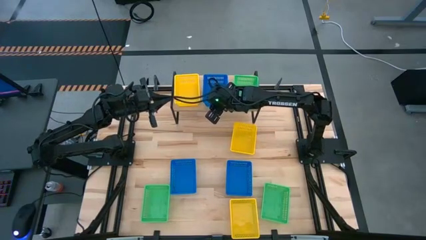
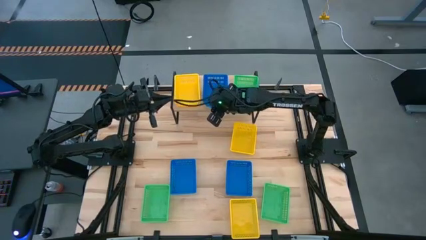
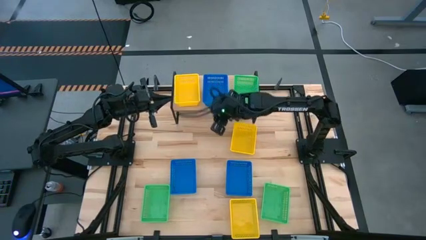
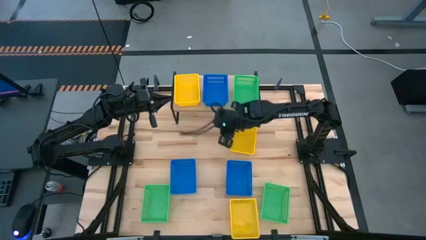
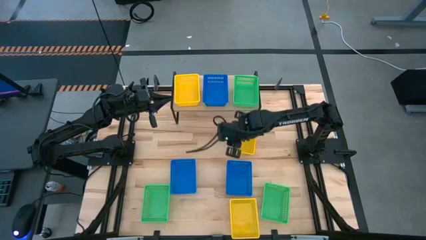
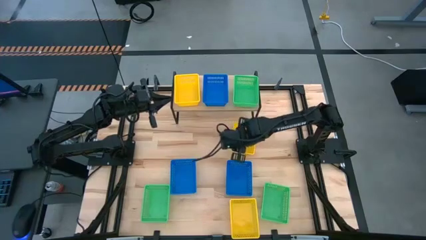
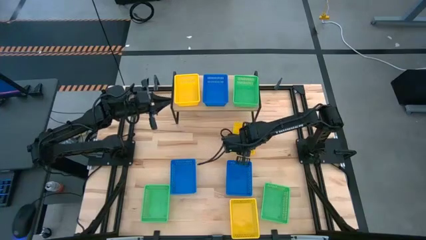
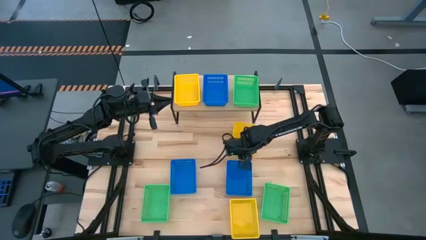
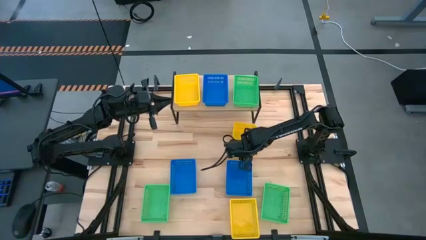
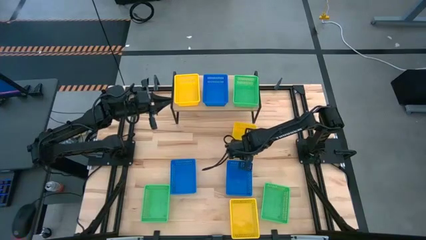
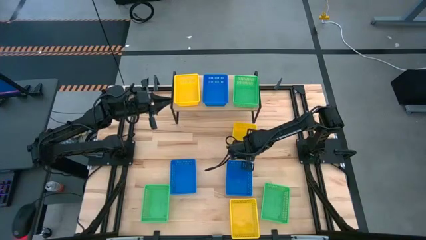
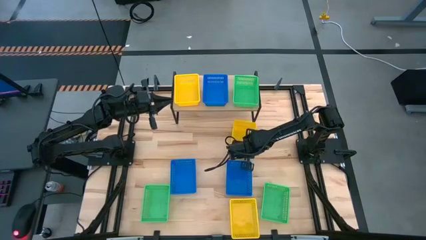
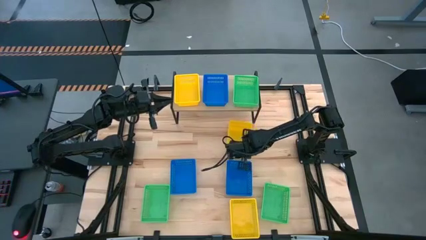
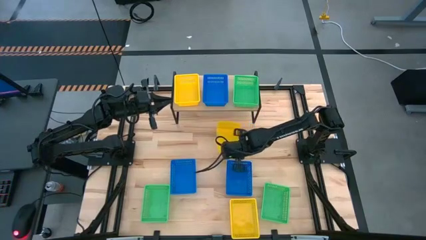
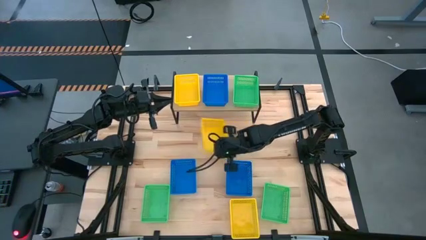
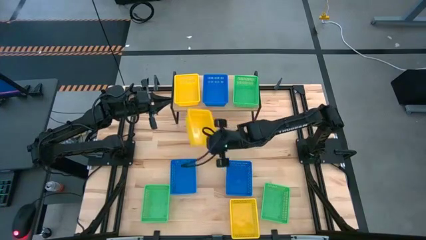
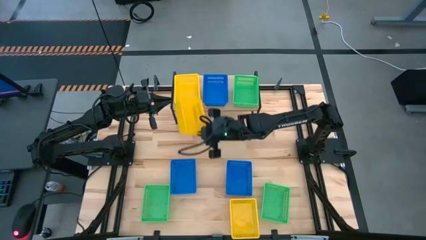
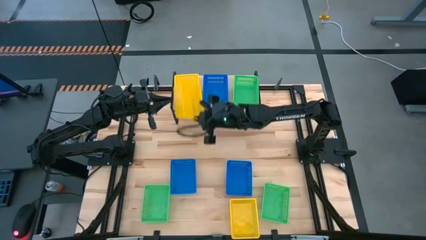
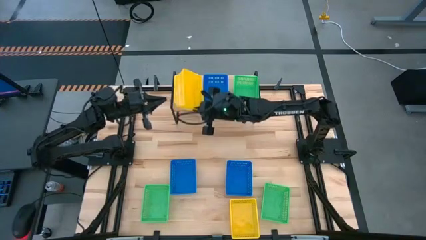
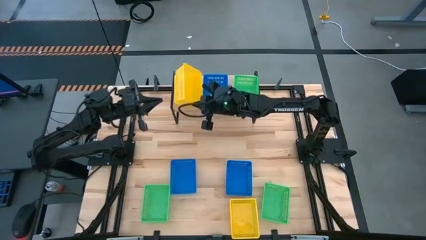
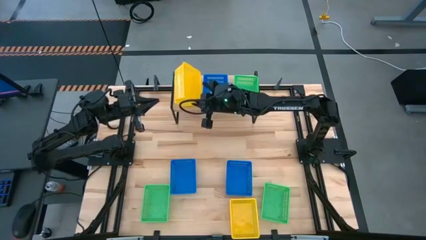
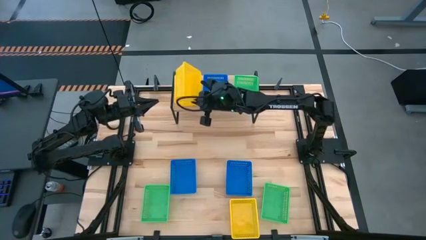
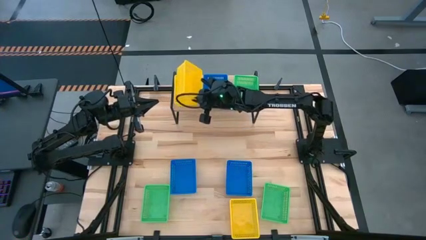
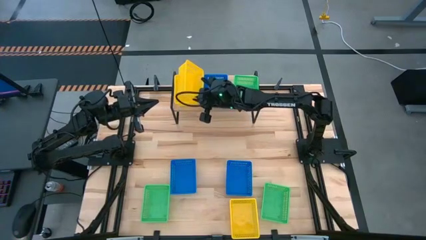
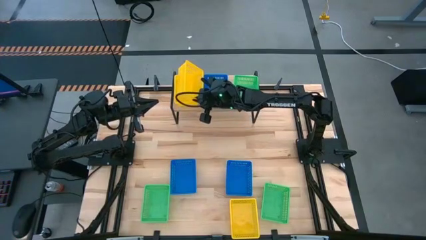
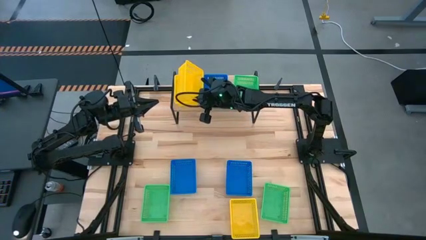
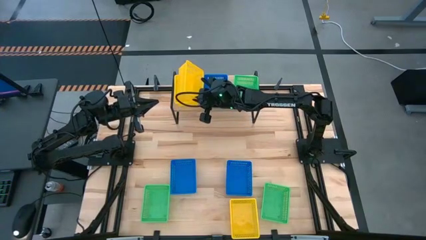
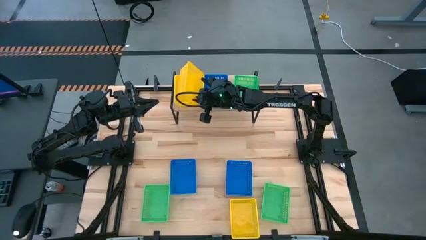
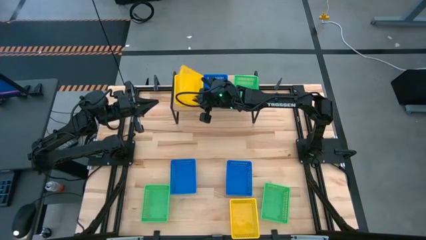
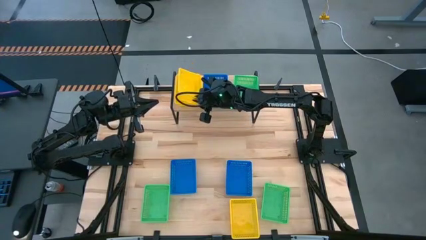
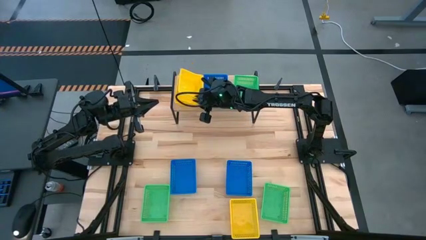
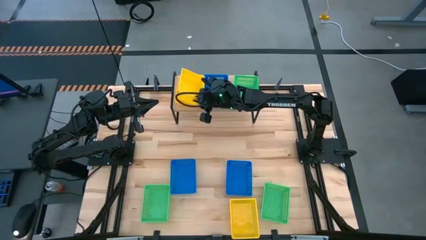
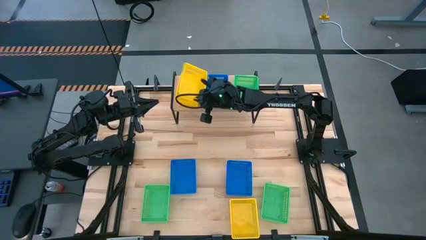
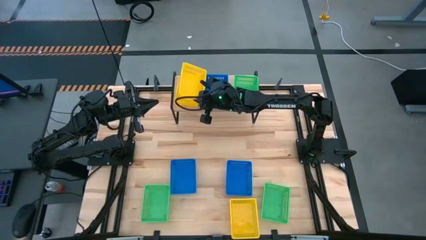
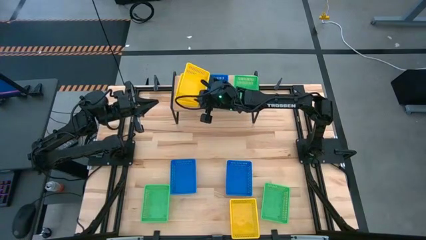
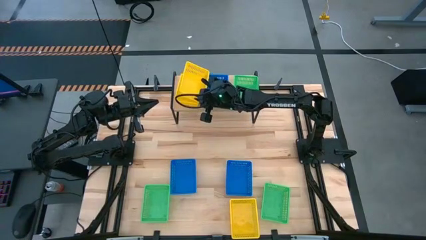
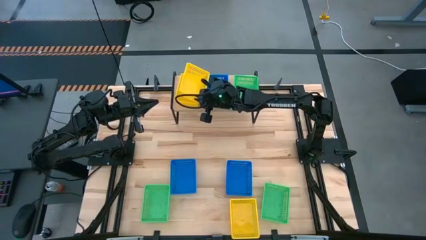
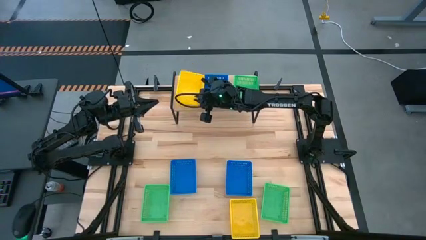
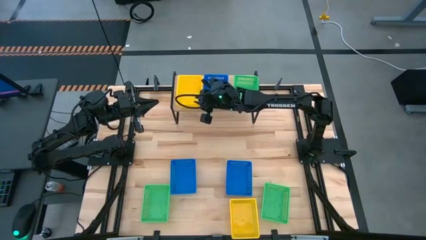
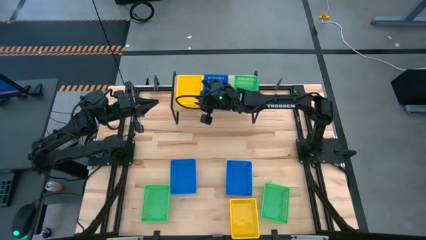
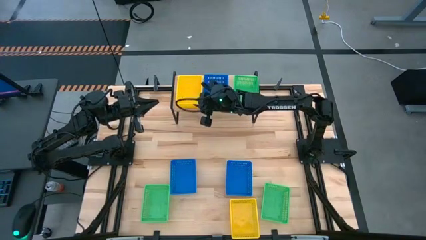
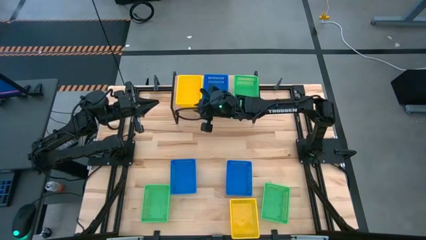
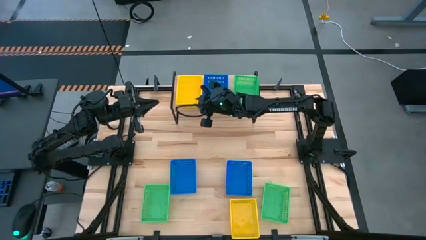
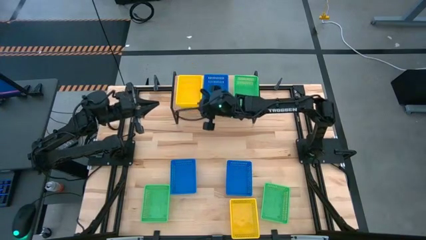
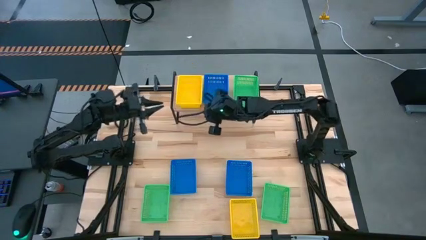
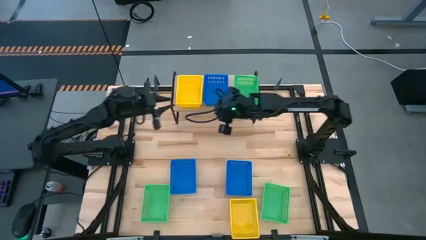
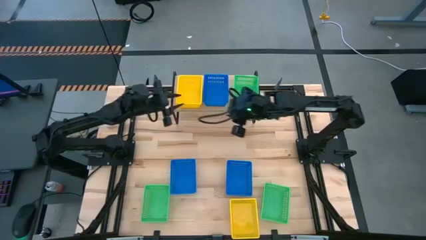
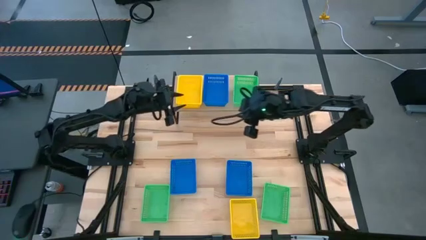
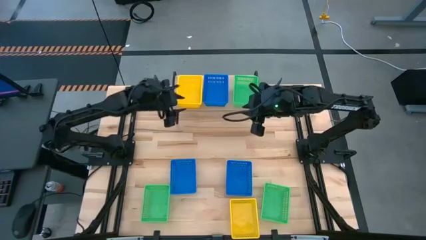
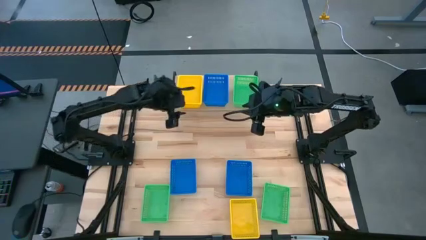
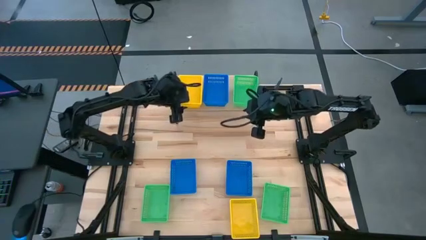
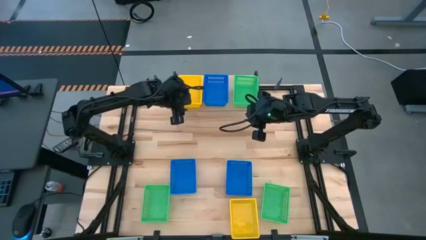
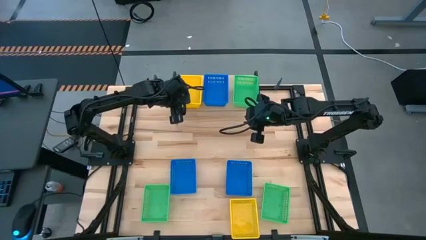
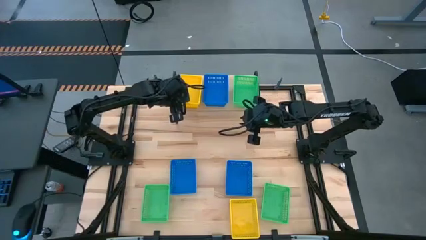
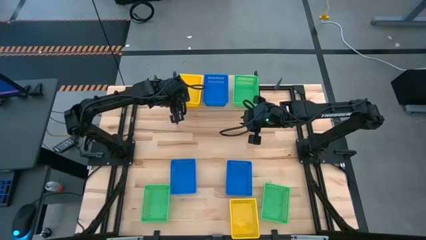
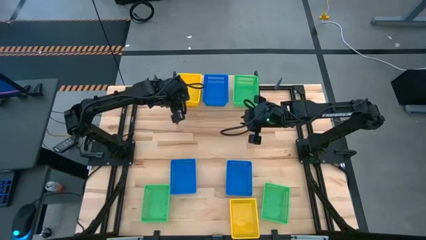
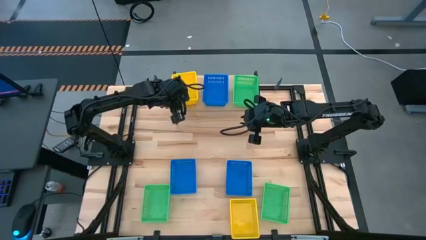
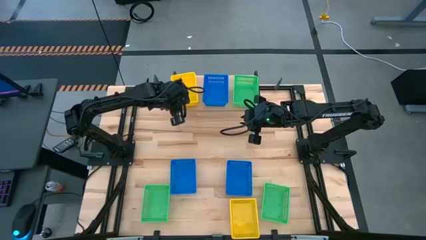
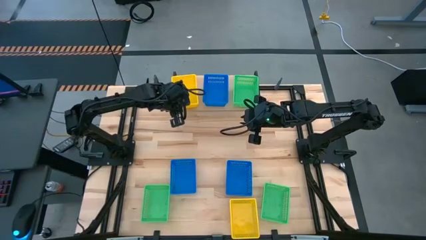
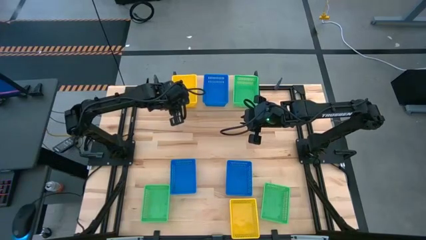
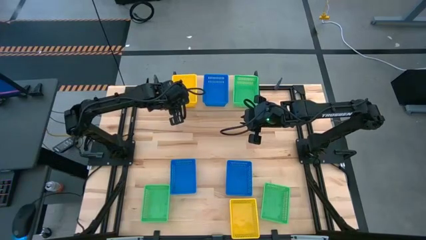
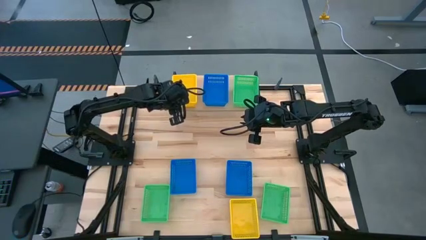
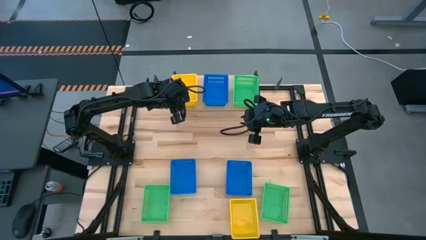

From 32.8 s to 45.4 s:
Task: Stack baskets on shelf by color
Stack the top yellow basket on the other yellow basket on the shelf

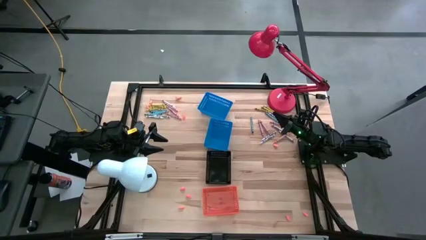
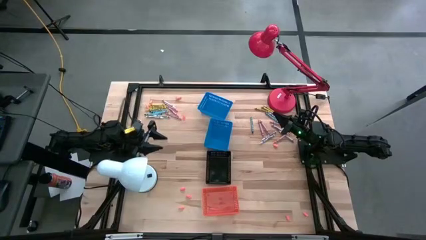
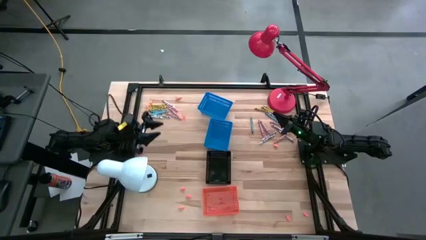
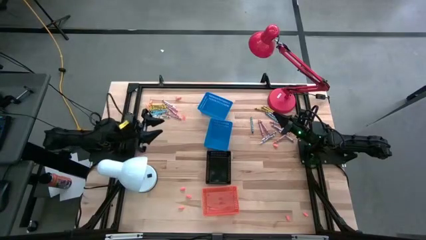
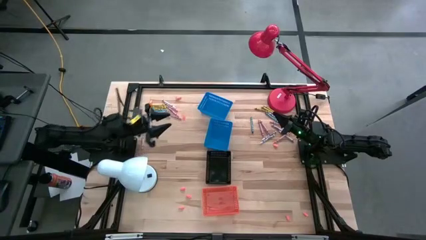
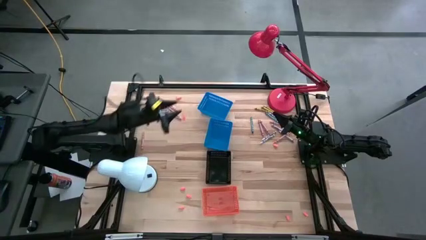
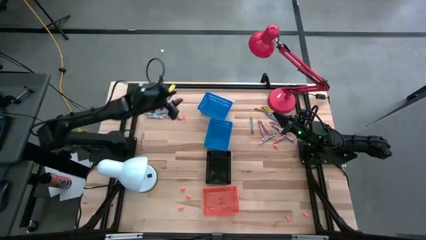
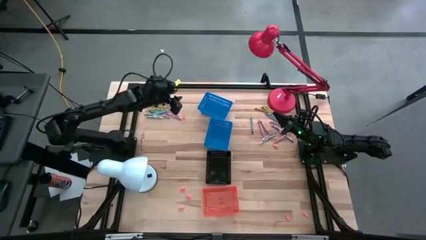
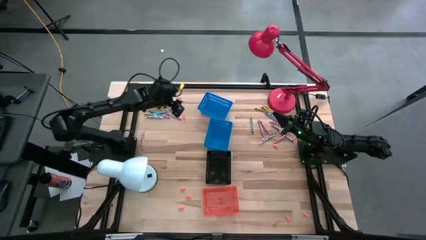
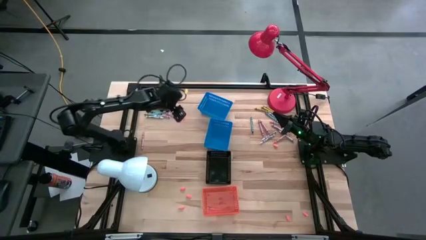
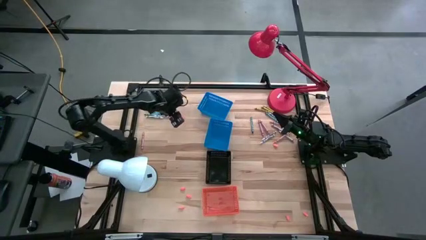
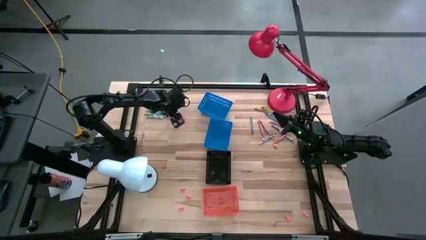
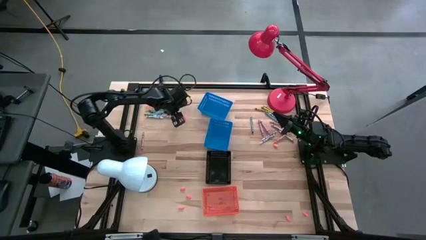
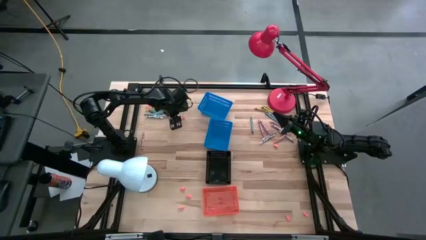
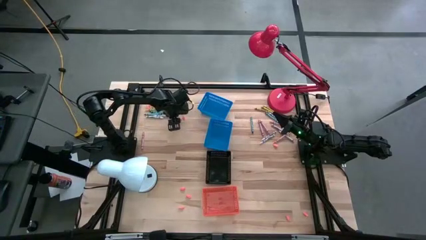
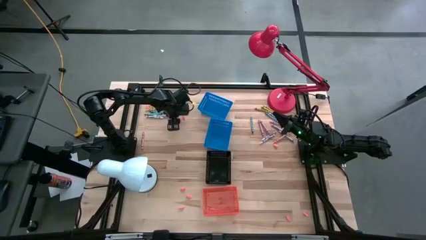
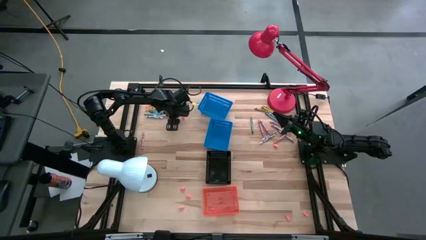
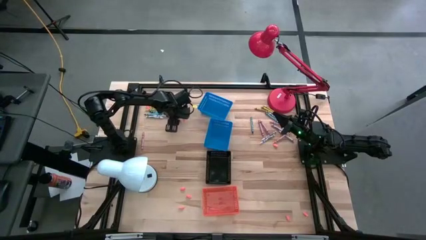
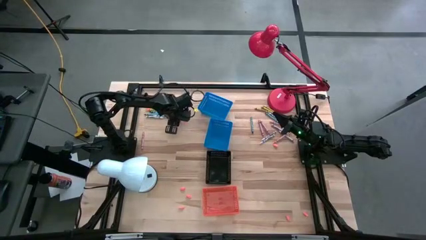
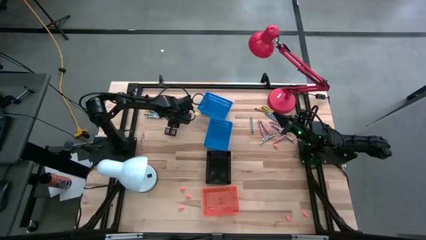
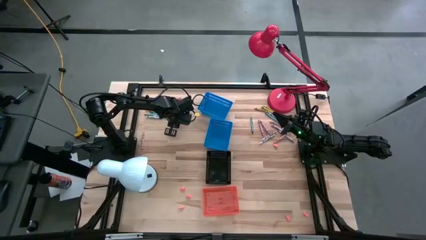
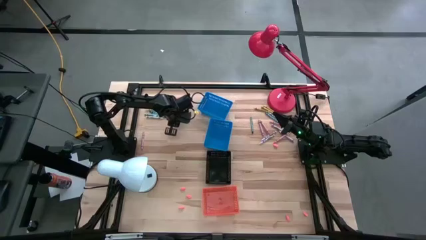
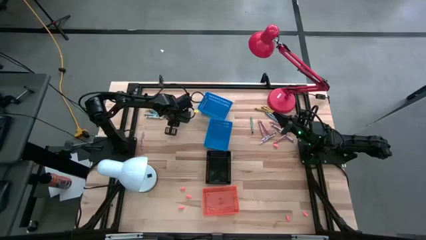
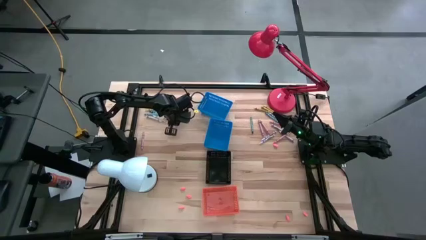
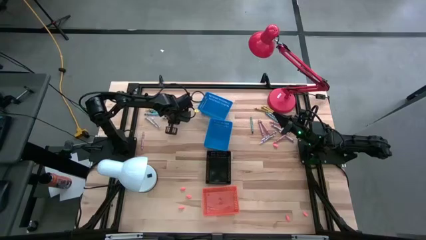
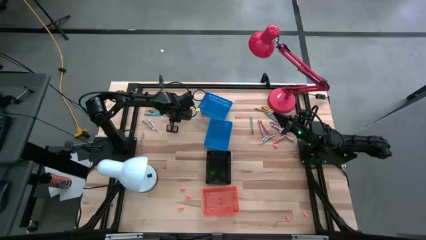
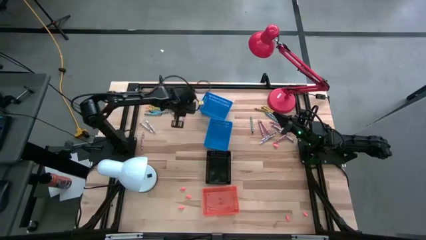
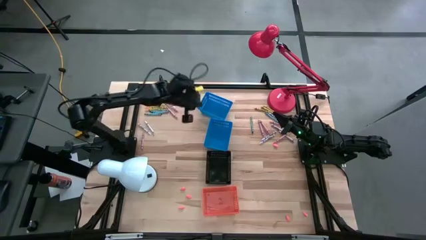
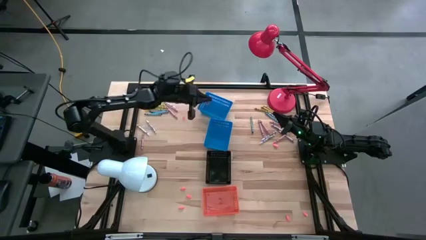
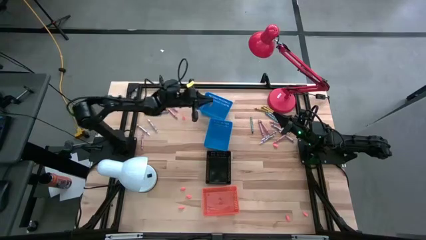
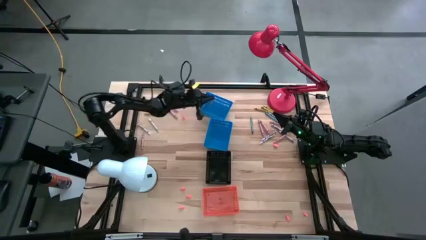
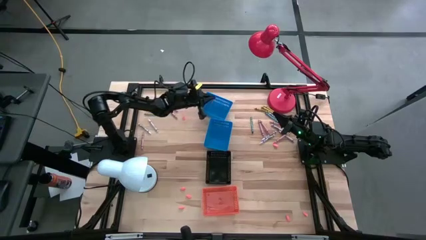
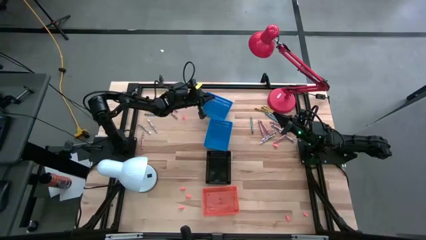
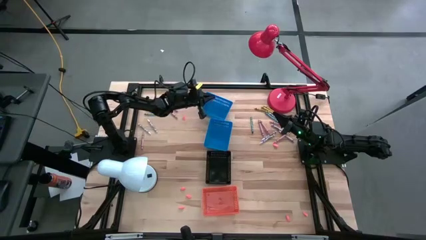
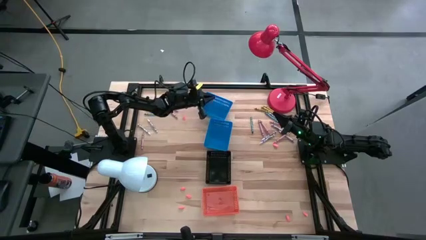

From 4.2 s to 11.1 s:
Task: Sort crayons
Put the pink crayon into the top blue bin
